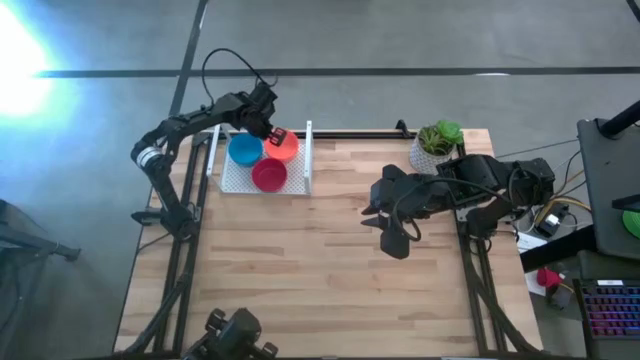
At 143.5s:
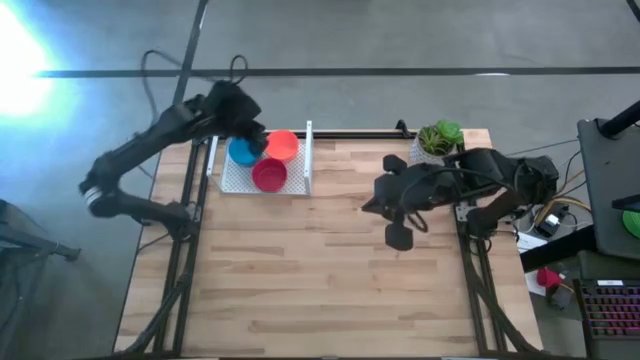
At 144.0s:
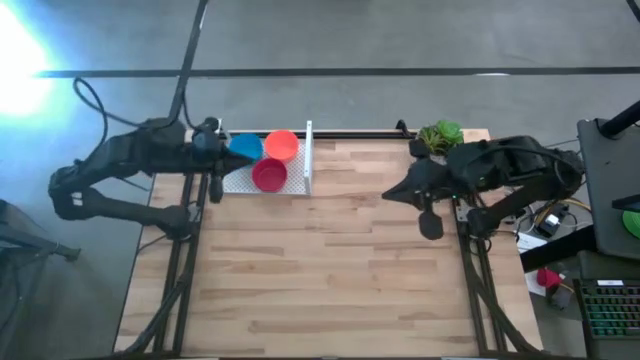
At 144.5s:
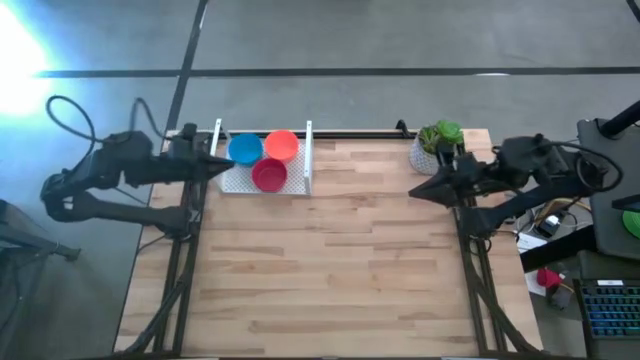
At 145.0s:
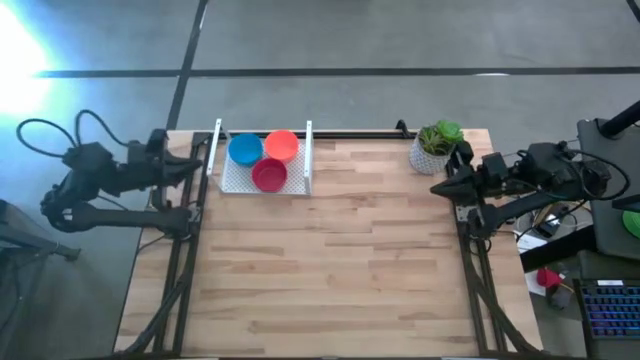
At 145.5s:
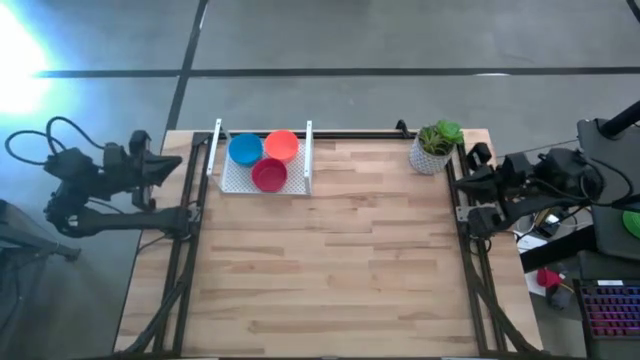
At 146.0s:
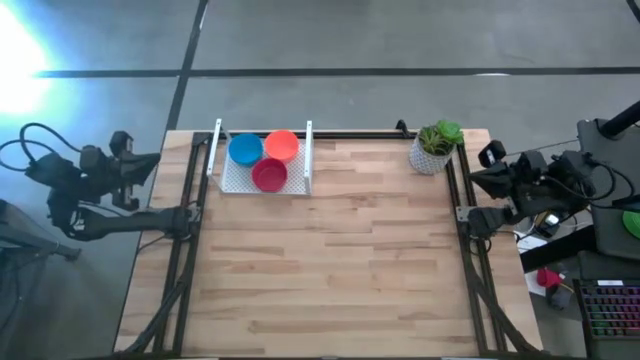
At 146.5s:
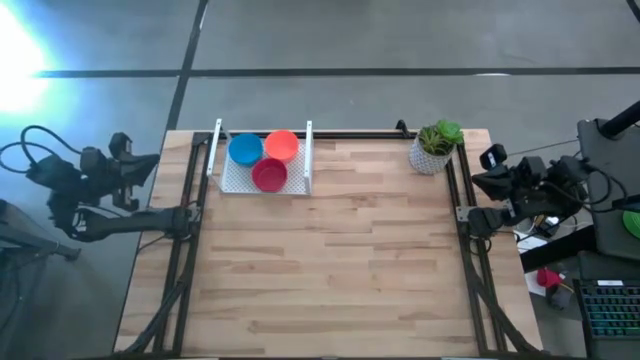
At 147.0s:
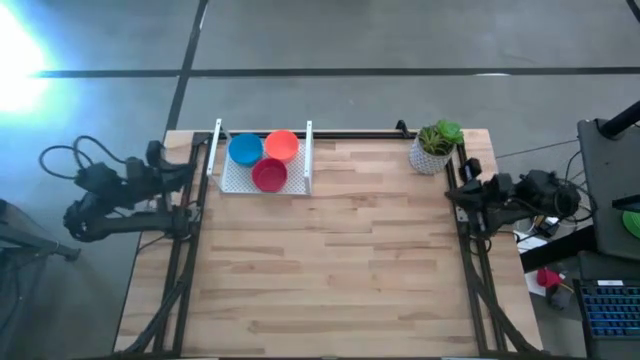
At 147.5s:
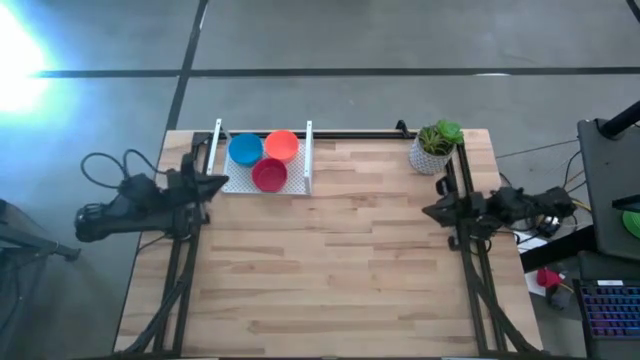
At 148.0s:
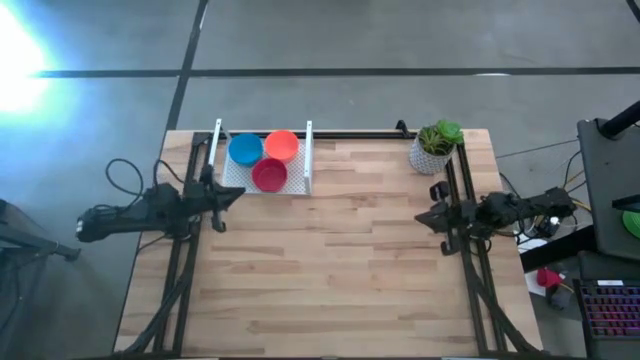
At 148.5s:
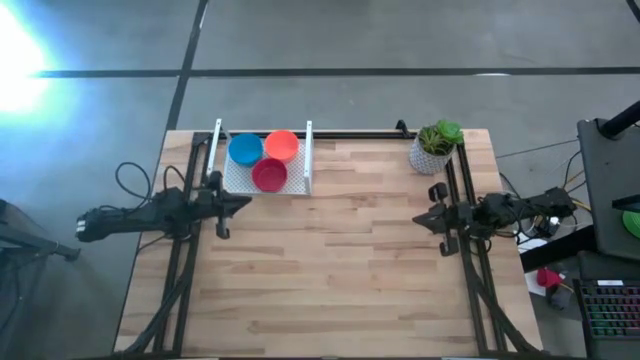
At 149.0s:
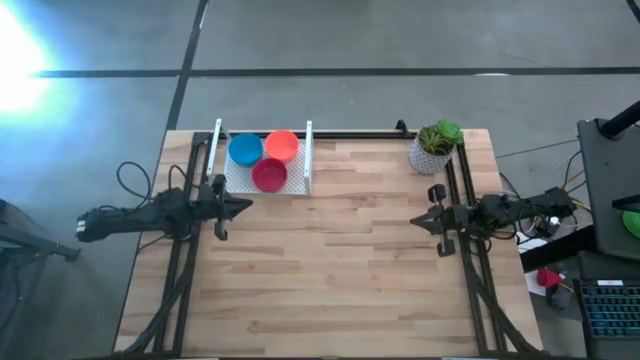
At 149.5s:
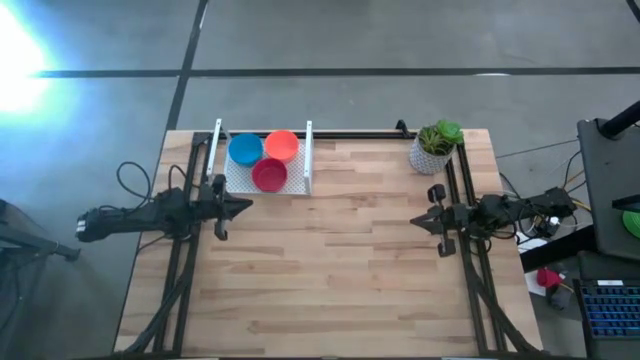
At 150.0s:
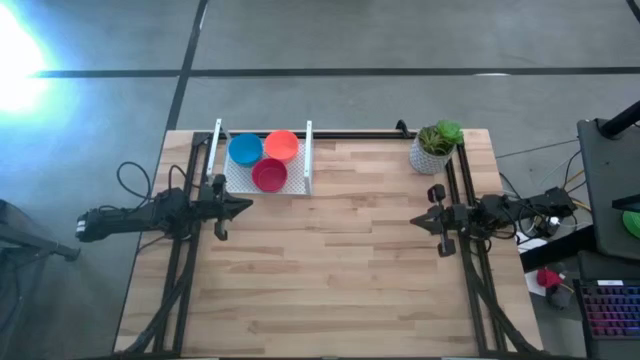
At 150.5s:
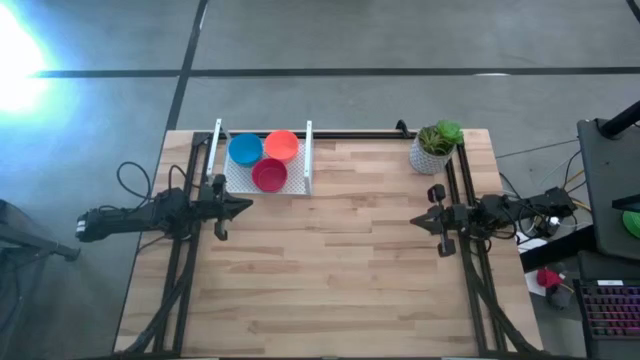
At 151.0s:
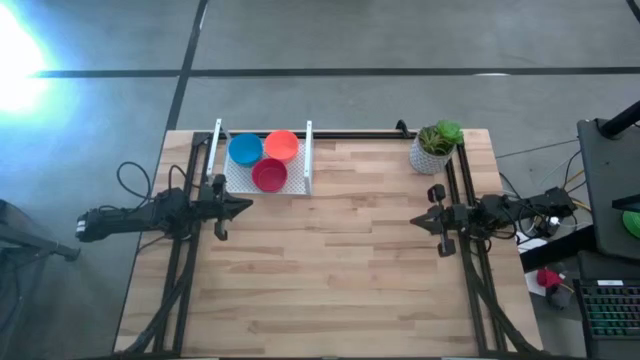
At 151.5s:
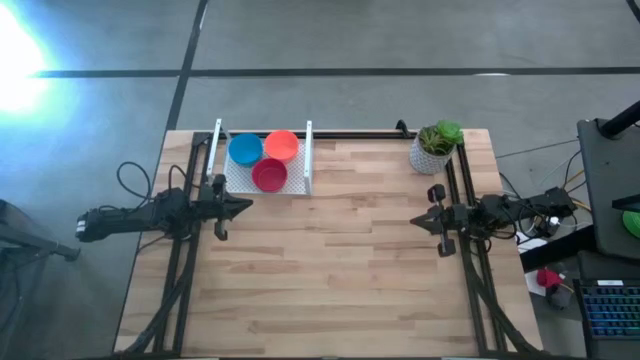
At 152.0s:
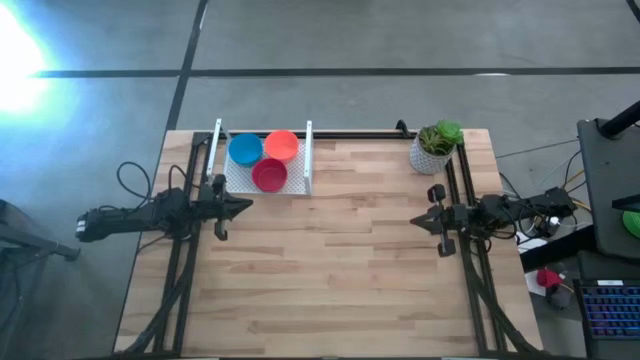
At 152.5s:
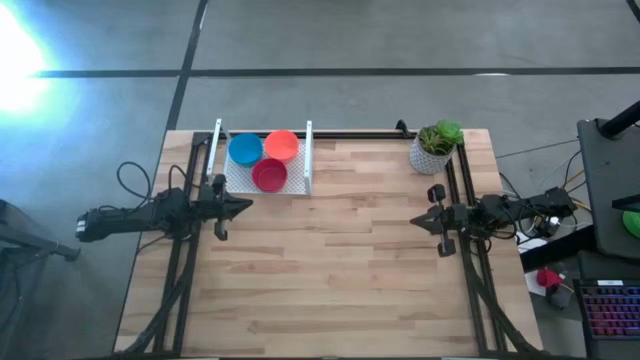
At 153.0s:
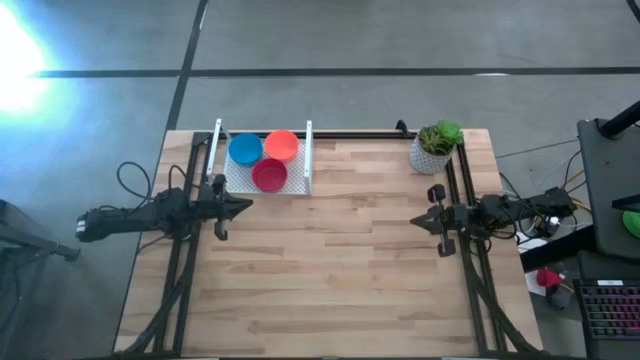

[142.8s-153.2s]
Task: Pick & Place Mini bowls
Return to Home Position

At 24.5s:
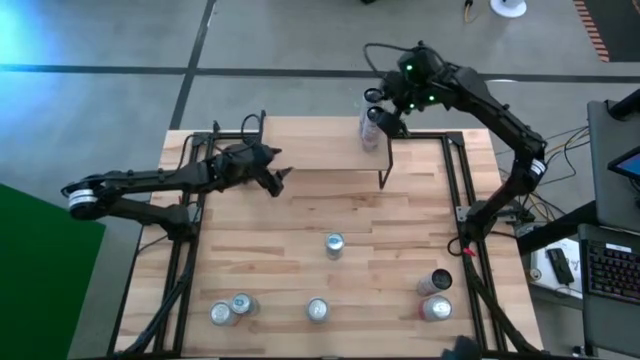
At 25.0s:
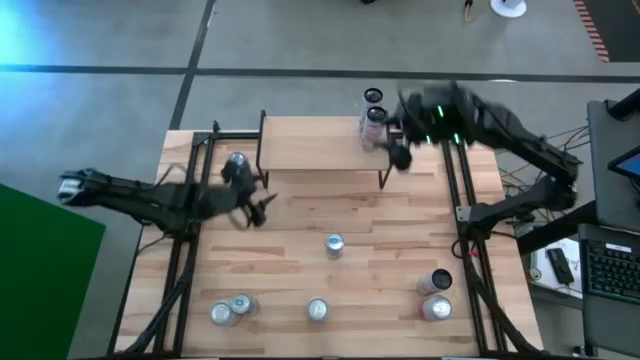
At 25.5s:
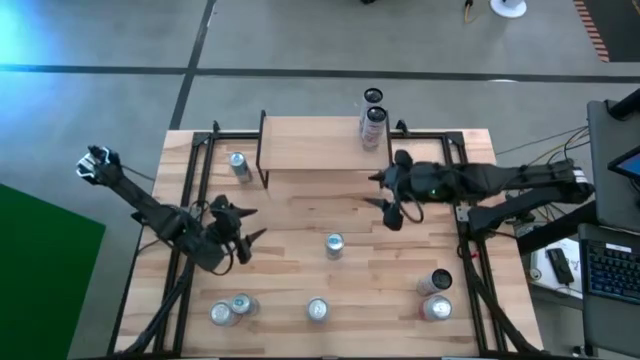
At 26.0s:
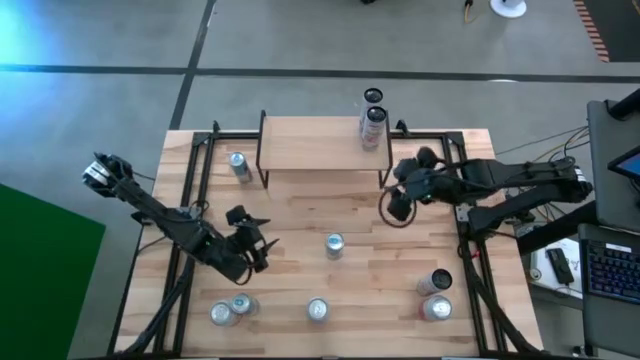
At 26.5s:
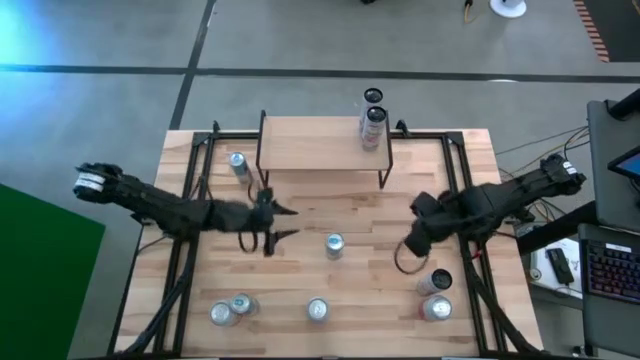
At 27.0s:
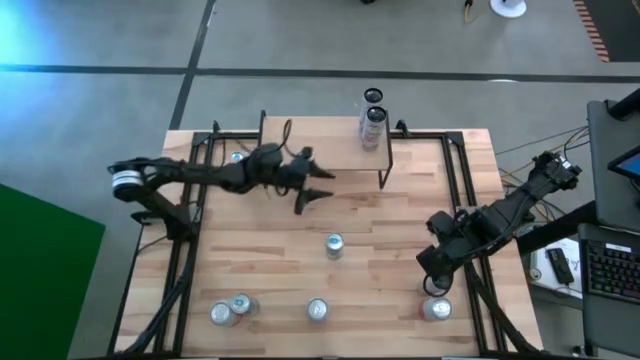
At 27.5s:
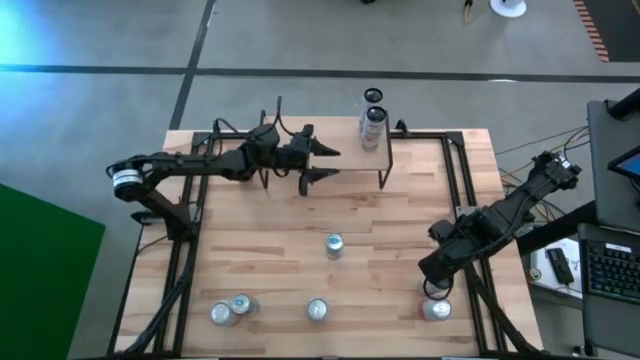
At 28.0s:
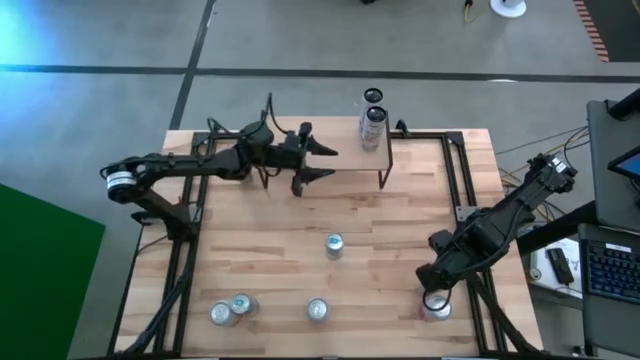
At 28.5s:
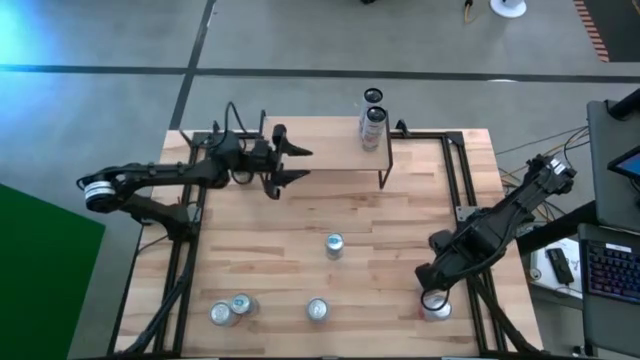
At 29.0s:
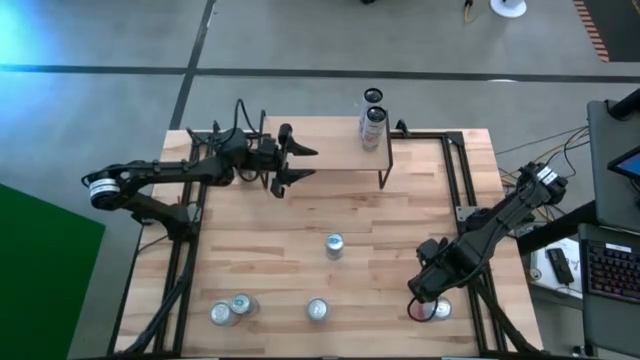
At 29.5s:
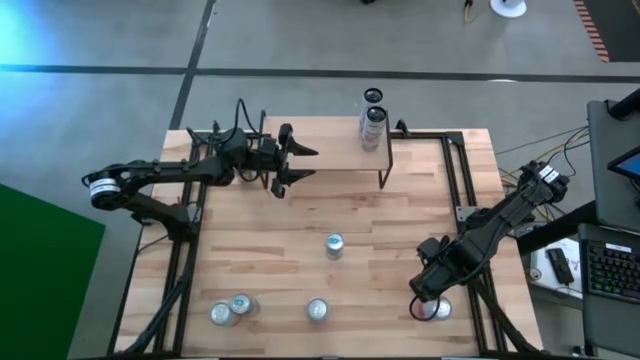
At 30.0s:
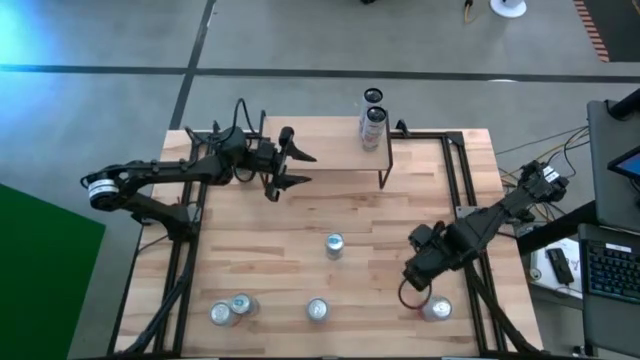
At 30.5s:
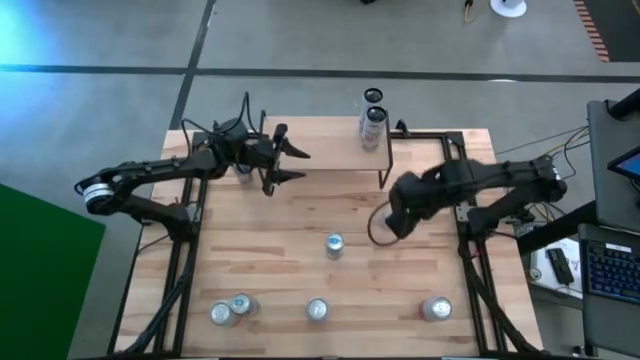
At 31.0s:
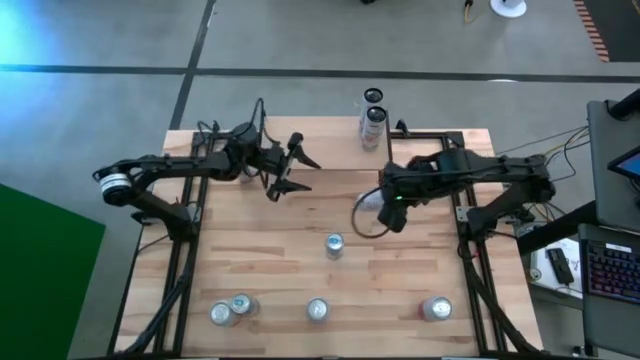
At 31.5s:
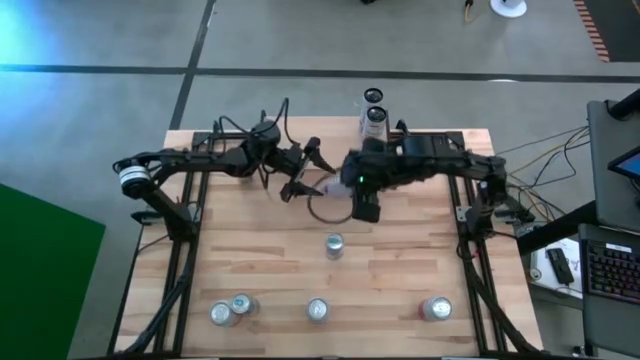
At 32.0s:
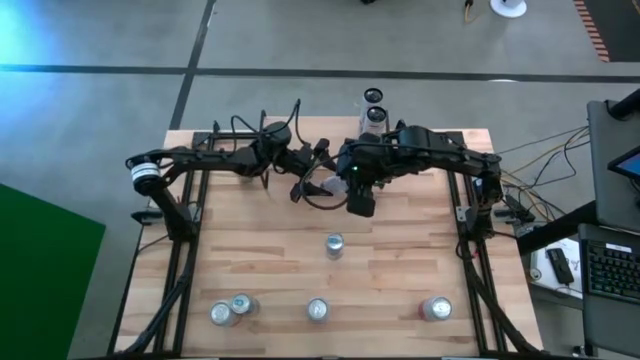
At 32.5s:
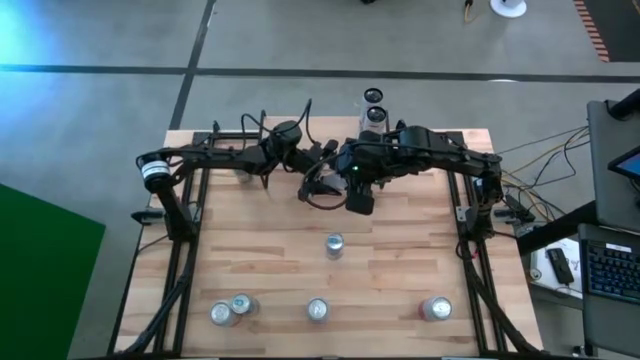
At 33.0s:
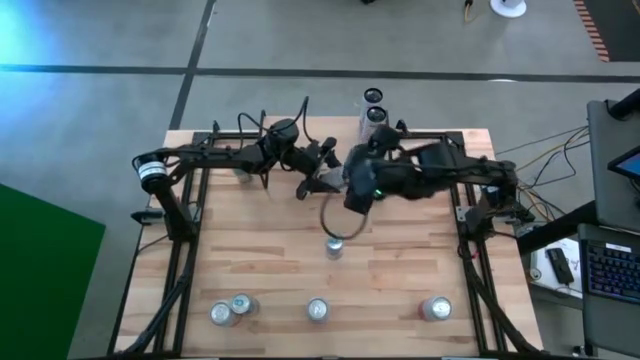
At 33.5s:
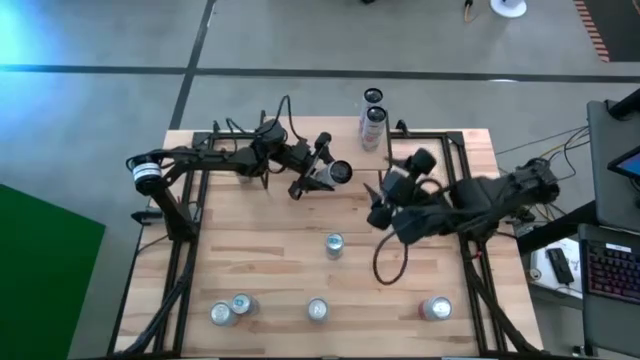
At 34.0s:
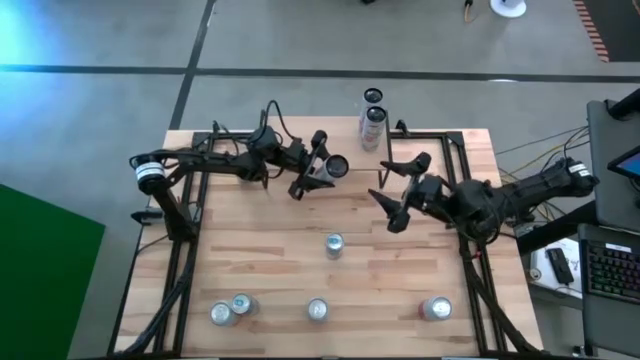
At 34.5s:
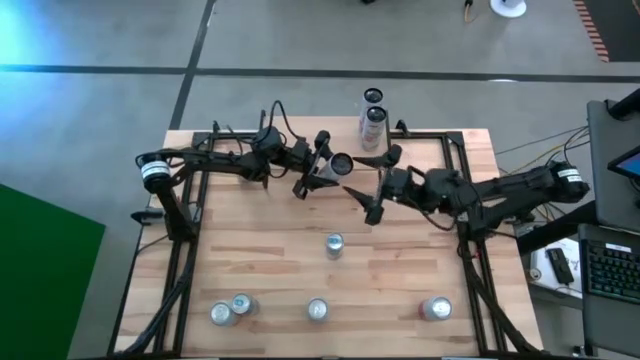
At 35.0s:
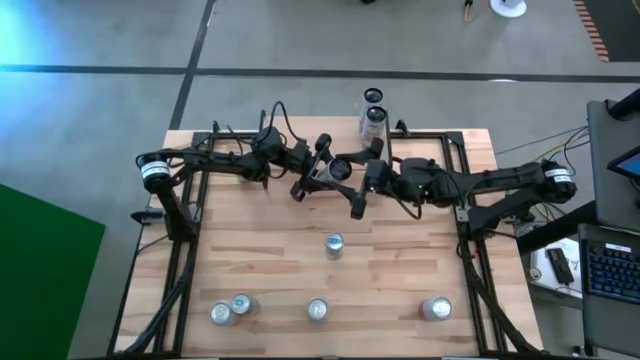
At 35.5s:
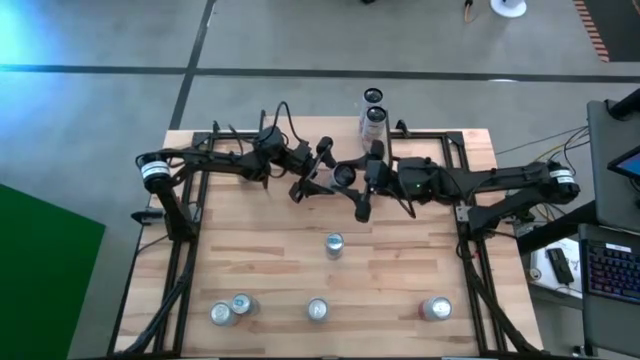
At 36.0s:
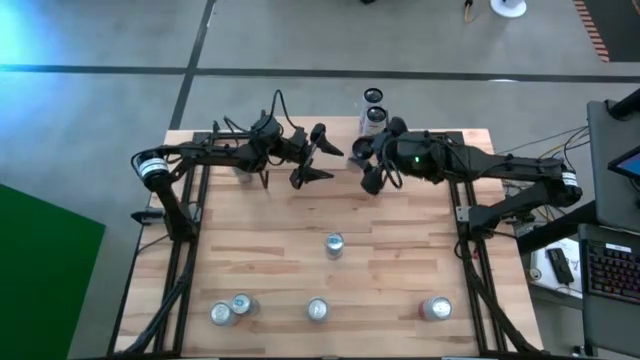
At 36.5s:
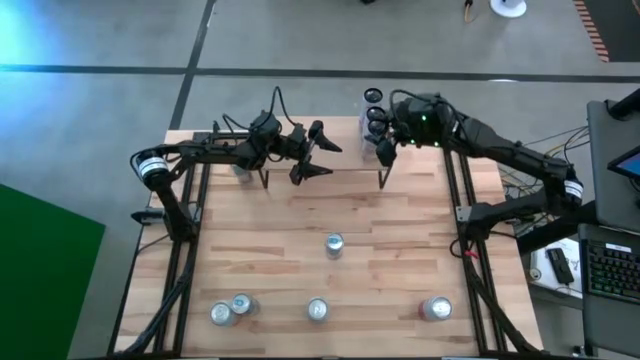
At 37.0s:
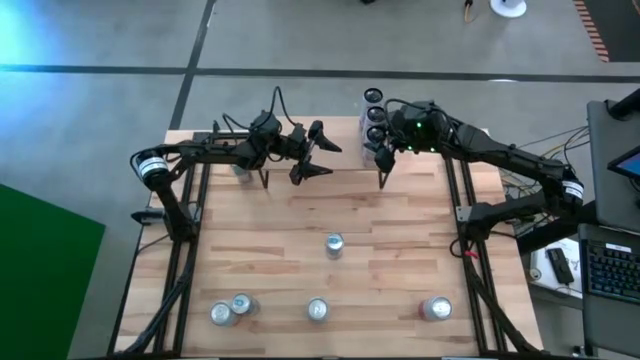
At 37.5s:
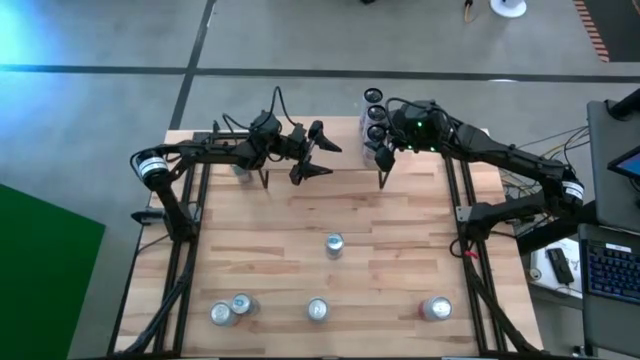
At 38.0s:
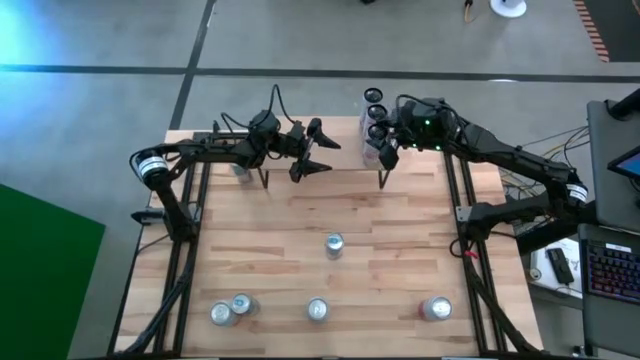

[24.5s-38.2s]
Task: Place canned beverage on shelf
Put the white soda can on the shelf aligned with the other white soda can
